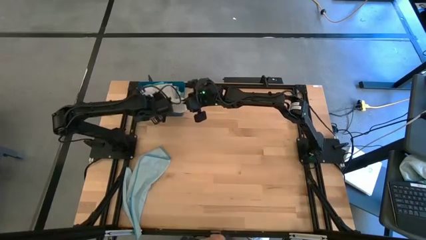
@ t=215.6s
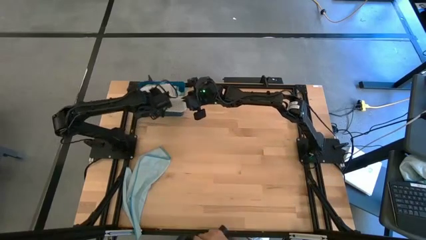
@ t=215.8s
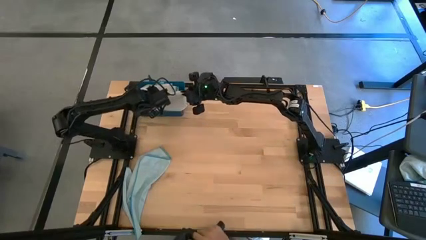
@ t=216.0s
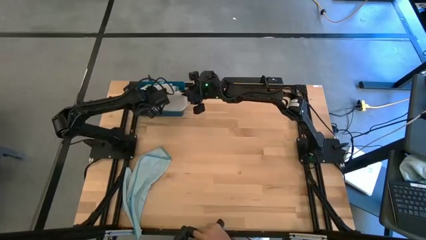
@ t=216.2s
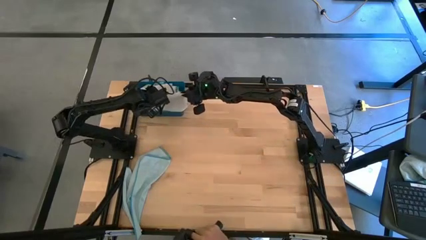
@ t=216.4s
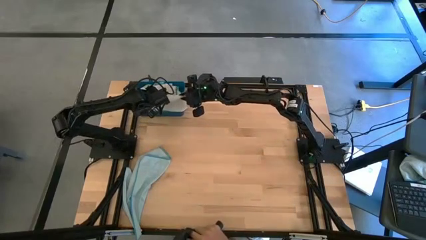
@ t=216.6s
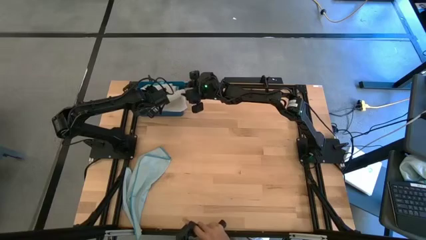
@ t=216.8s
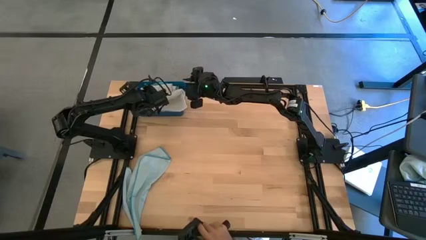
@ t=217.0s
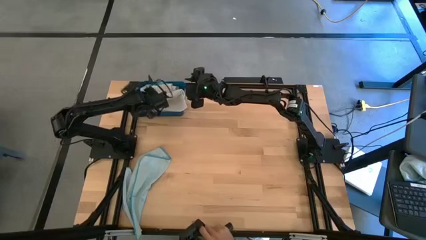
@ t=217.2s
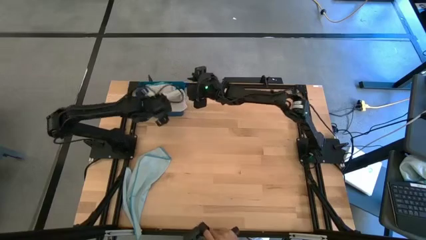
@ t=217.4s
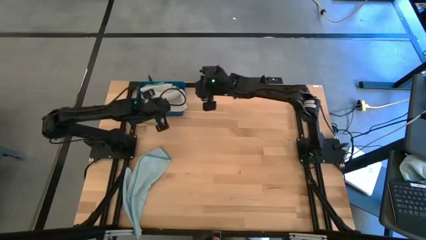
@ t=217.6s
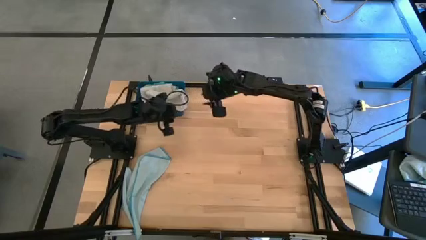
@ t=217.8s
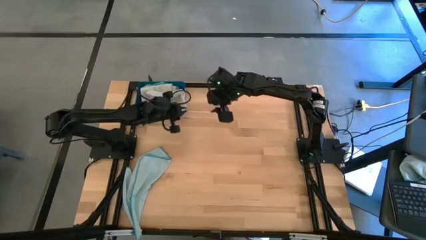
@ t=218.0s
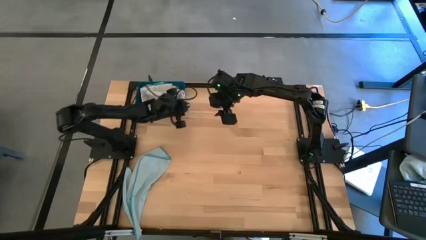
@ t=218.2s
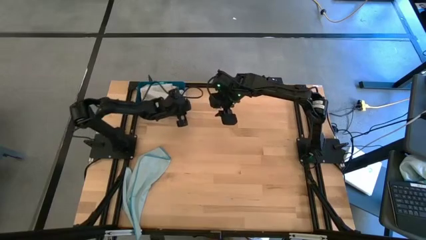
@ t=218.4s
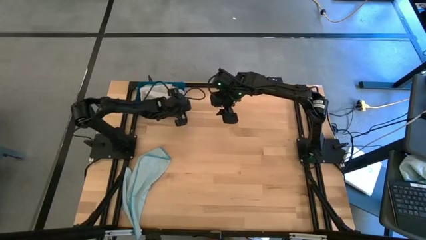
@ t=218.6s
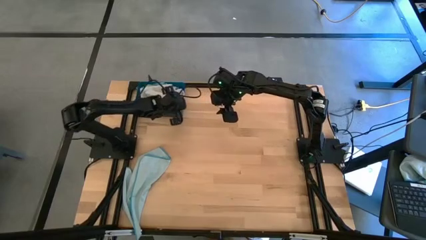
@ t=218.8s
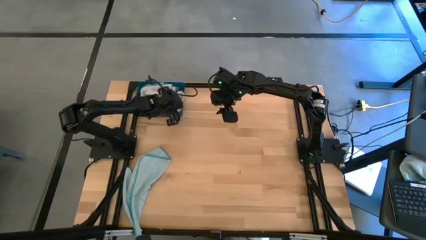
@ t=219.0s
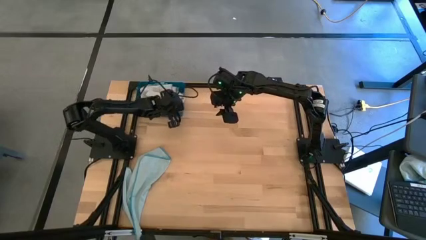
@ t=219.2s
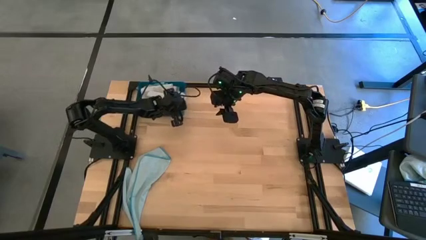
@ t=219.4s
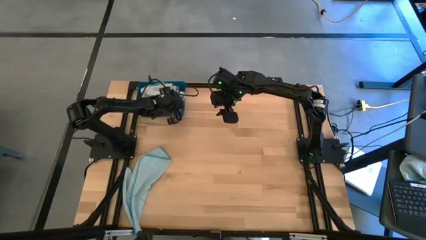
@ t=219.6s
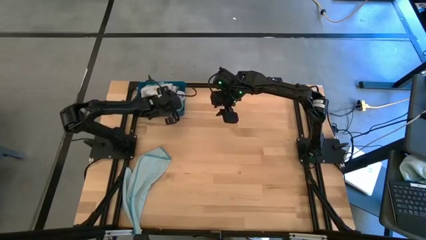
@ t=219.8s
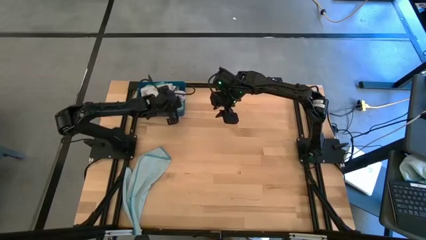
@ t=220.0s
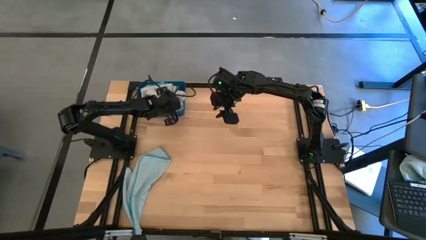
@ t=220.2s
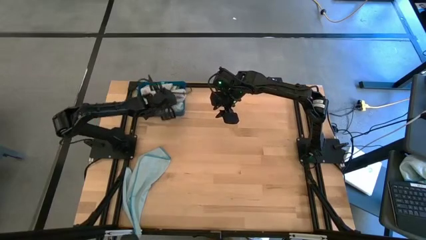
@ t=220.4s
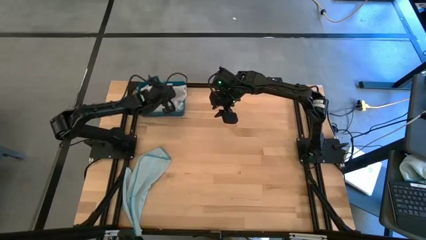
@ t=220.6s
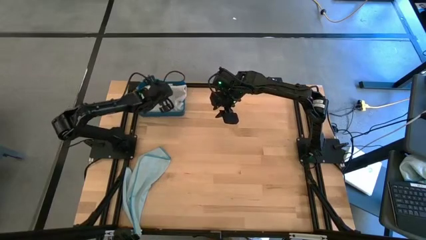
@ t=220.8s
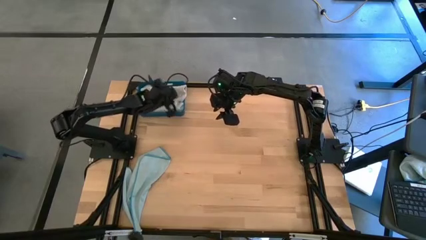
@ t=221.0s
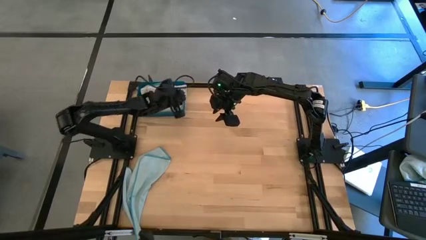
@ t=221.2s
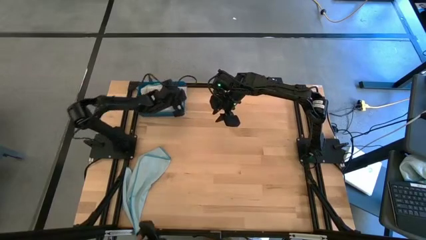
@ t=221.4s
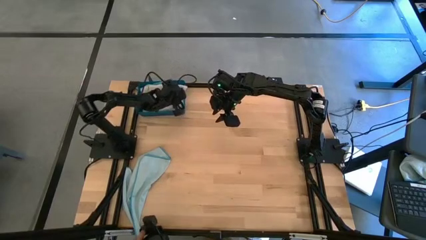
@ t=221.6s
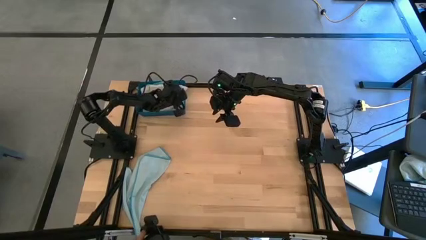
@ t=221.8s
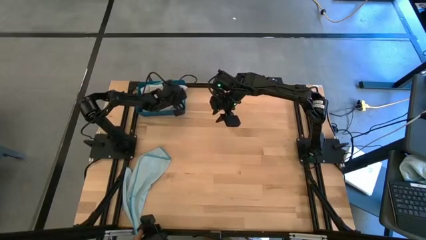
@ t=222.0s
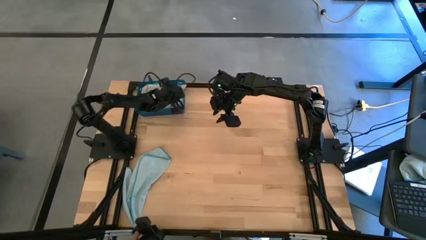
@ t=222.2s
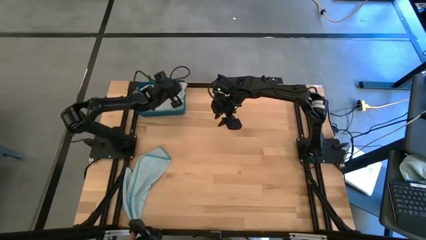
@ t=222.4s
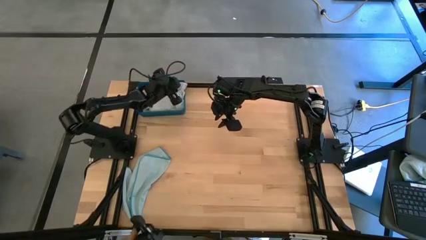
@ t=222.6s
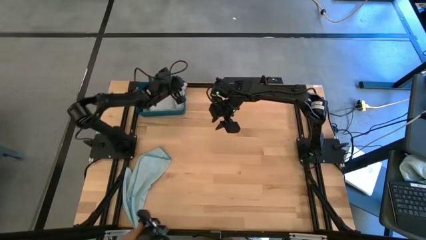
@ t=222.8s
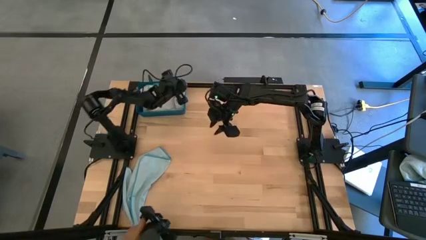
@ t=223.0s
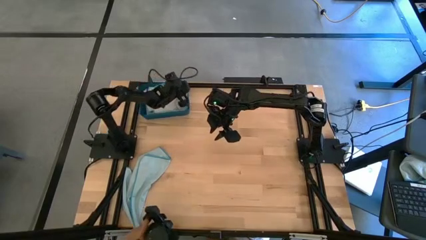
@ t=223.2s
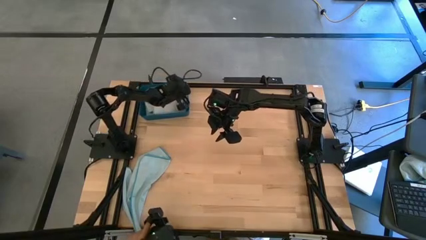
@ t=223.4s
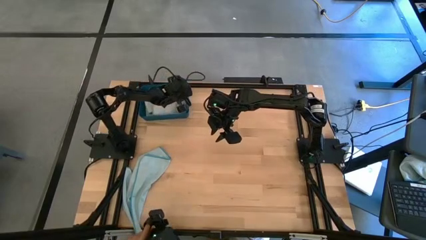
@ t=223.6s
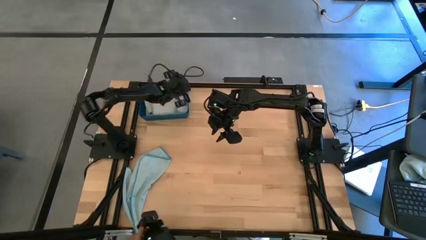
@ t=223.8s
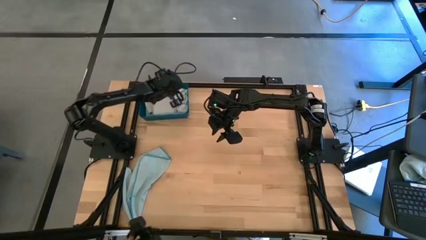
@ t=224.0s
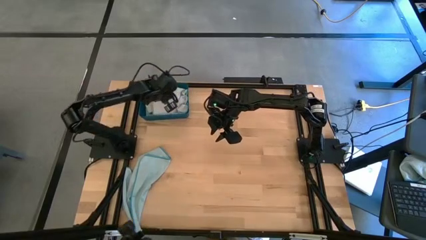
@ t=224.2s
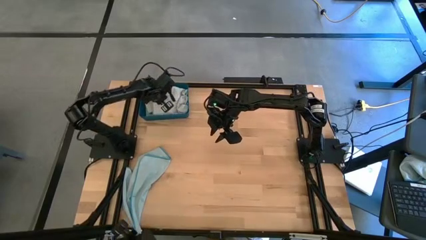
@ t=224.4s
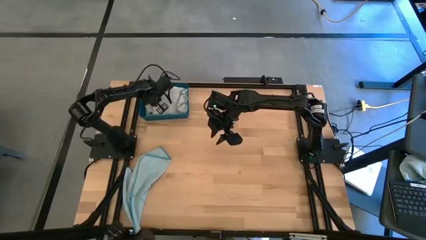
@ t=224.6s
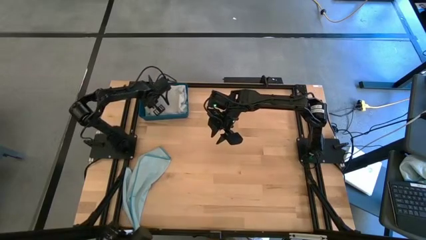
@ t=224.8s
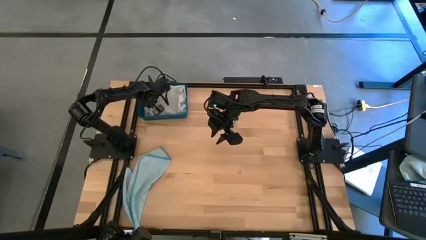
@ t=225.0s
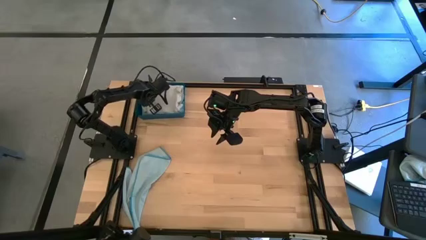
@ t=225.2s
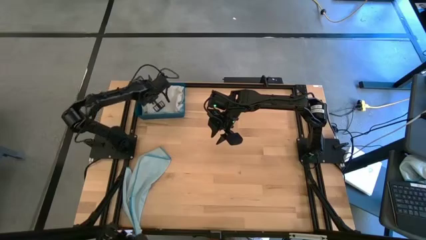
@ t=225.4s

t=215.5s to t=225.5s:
Task: Fold microfiber towels
Put the gray towel into the blue bin
